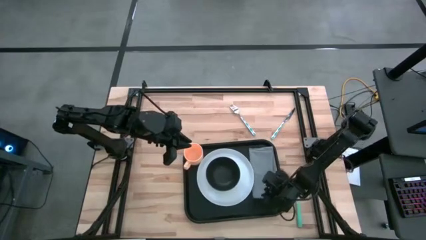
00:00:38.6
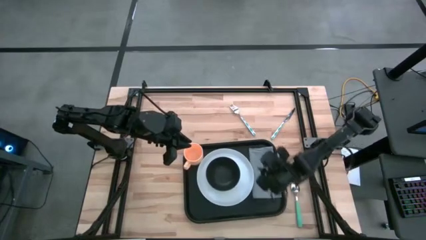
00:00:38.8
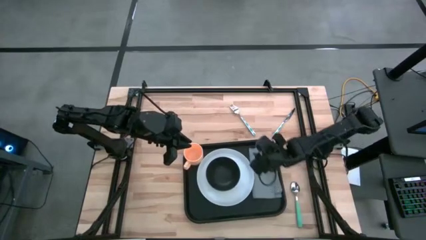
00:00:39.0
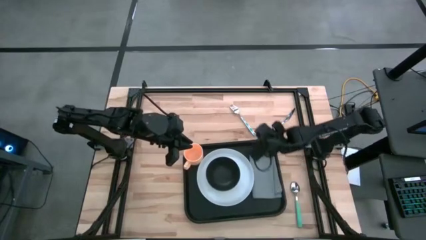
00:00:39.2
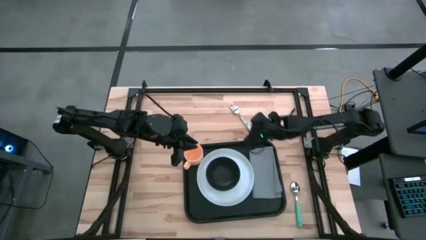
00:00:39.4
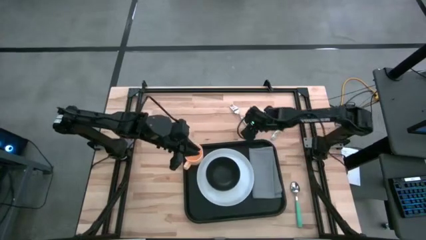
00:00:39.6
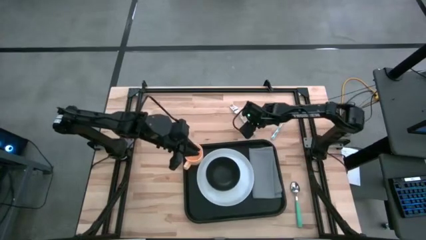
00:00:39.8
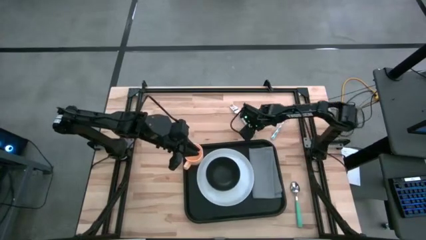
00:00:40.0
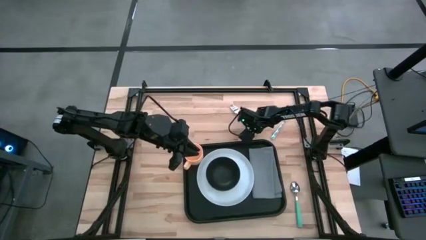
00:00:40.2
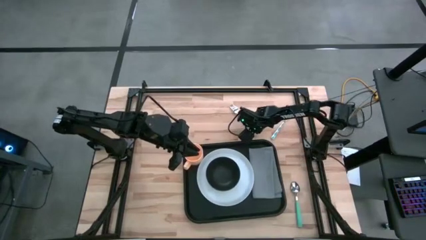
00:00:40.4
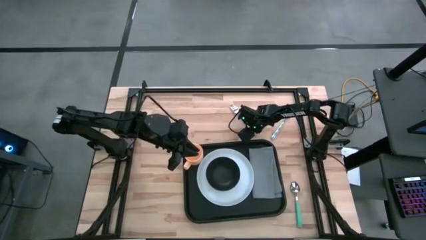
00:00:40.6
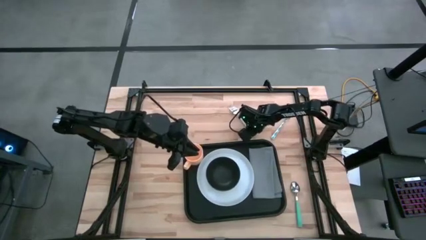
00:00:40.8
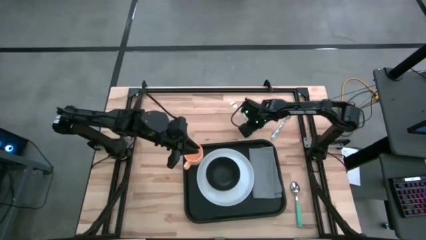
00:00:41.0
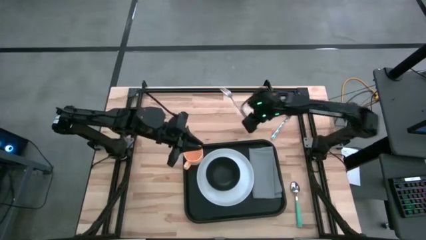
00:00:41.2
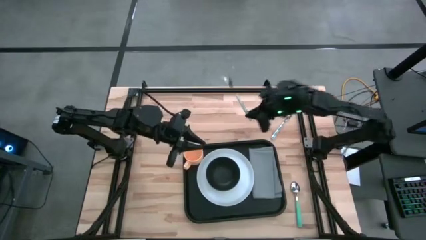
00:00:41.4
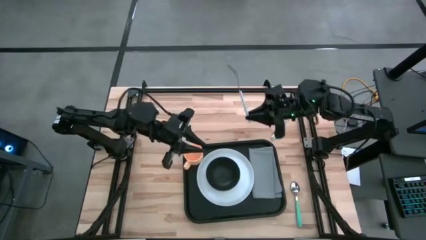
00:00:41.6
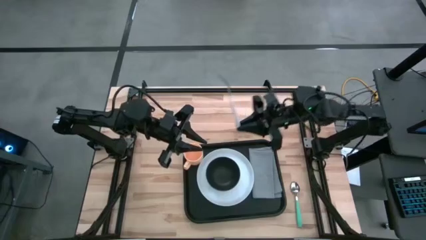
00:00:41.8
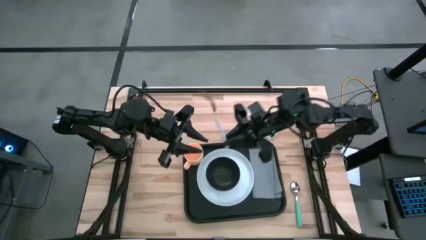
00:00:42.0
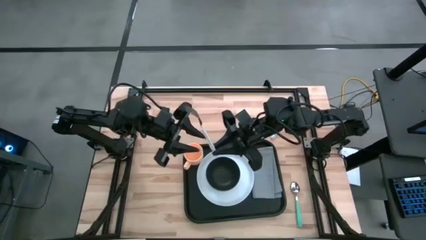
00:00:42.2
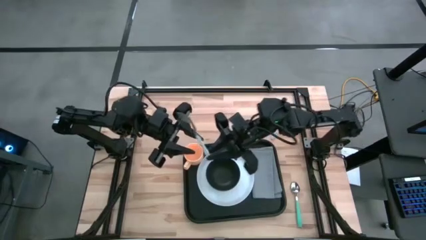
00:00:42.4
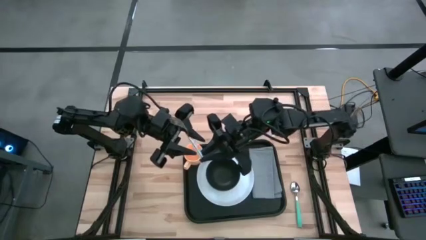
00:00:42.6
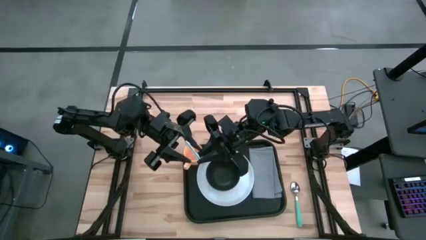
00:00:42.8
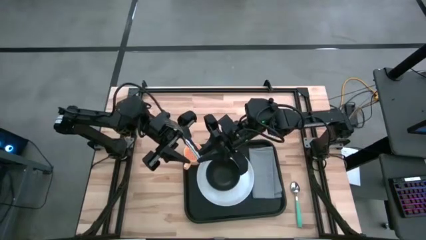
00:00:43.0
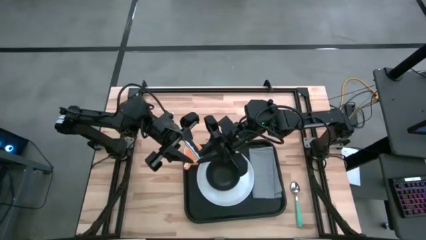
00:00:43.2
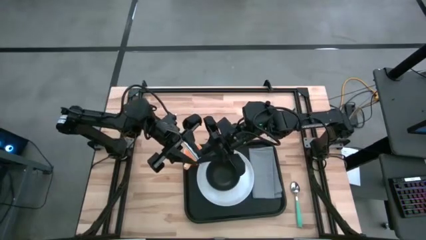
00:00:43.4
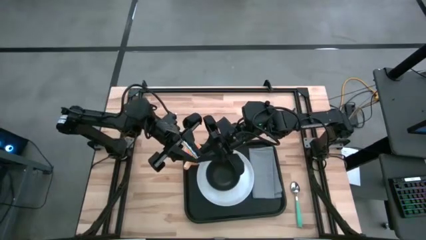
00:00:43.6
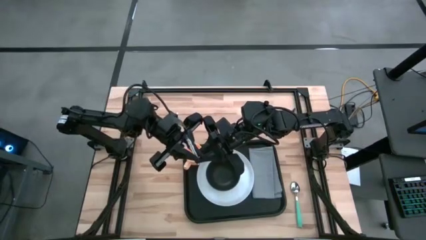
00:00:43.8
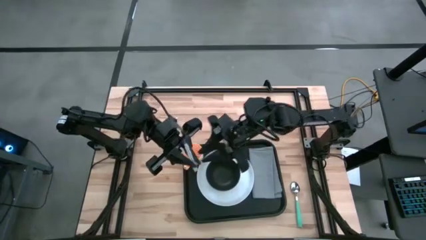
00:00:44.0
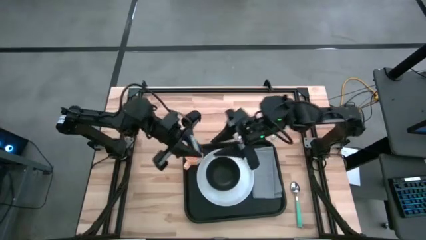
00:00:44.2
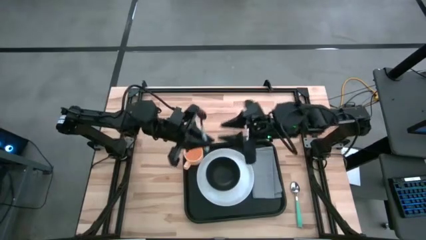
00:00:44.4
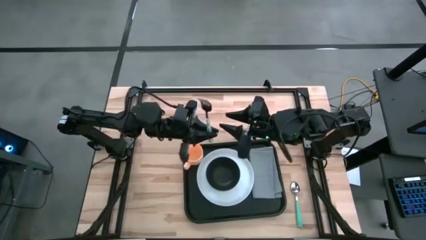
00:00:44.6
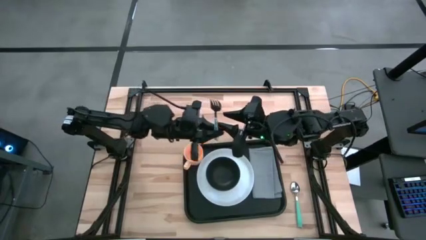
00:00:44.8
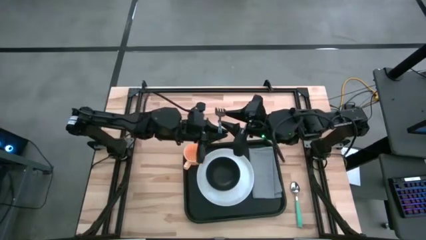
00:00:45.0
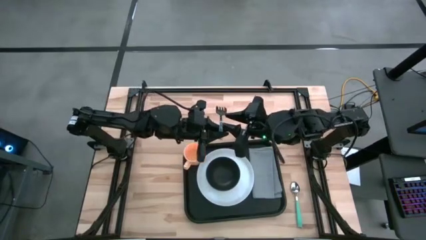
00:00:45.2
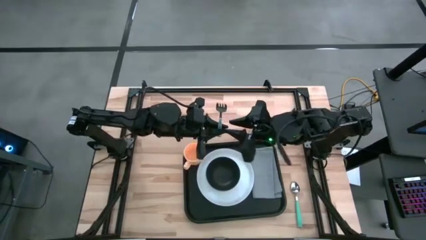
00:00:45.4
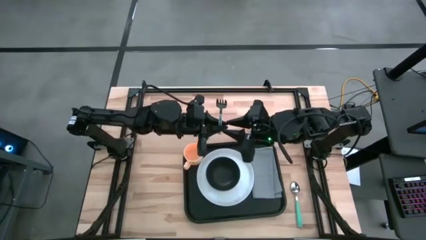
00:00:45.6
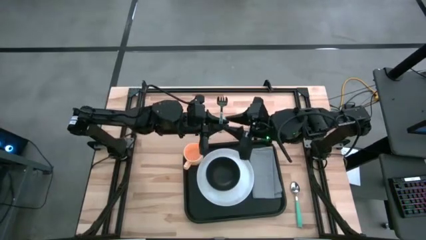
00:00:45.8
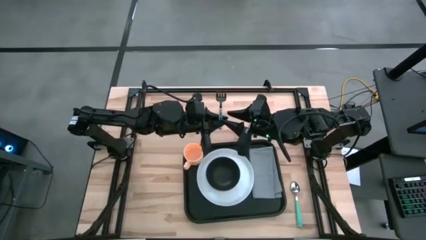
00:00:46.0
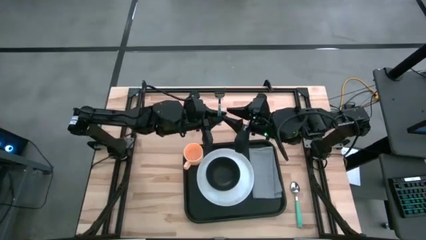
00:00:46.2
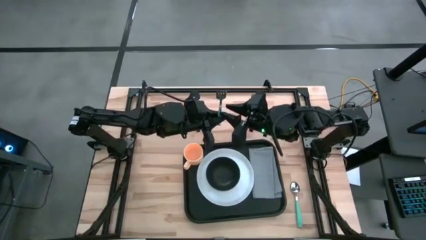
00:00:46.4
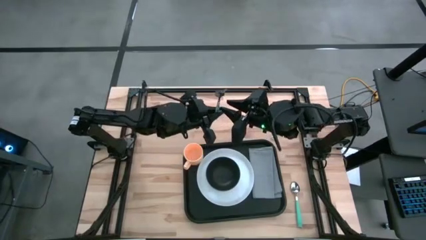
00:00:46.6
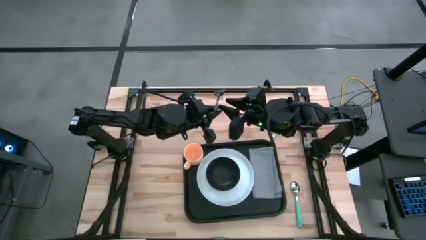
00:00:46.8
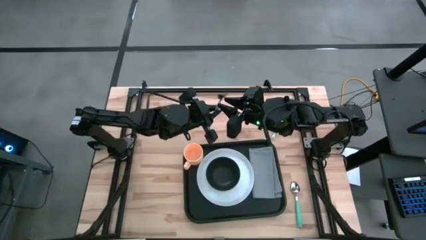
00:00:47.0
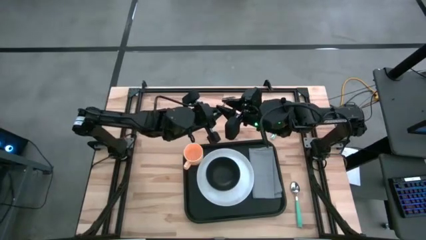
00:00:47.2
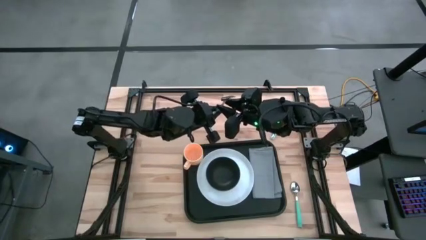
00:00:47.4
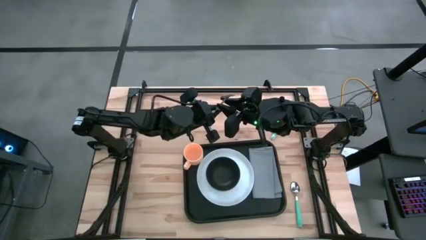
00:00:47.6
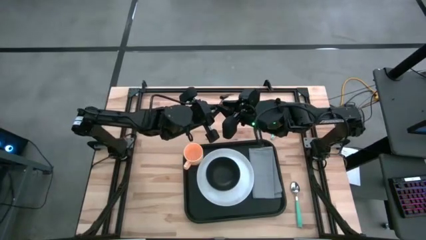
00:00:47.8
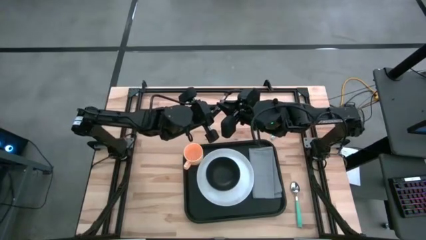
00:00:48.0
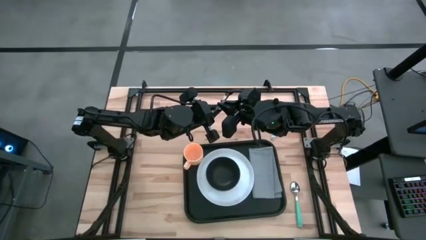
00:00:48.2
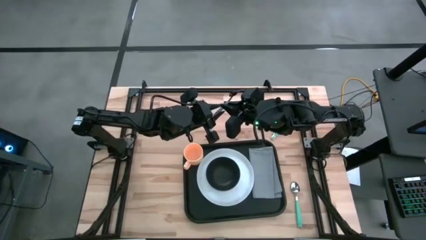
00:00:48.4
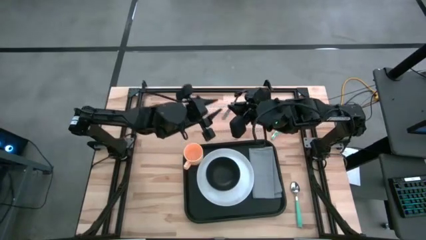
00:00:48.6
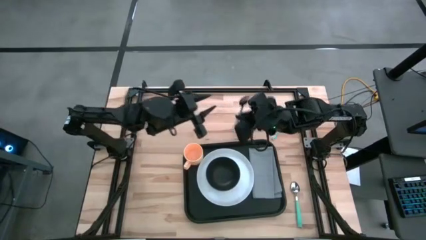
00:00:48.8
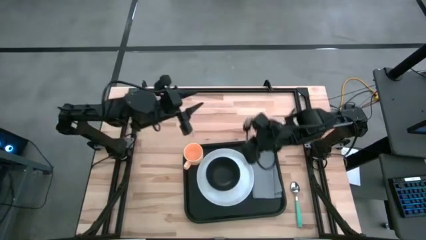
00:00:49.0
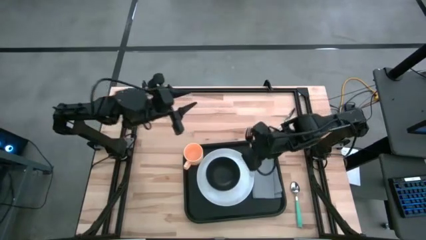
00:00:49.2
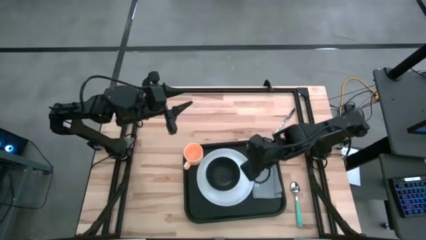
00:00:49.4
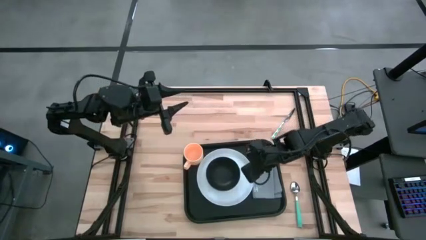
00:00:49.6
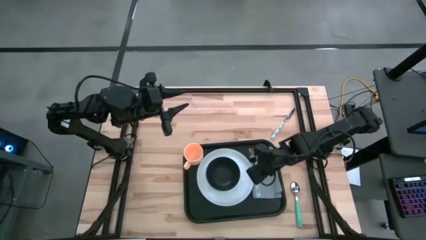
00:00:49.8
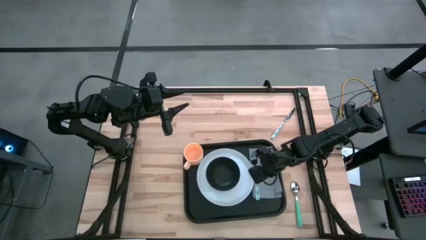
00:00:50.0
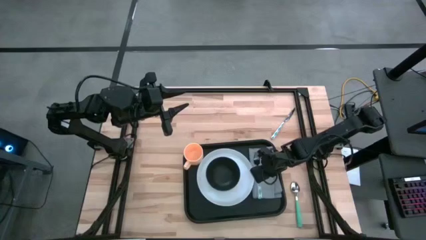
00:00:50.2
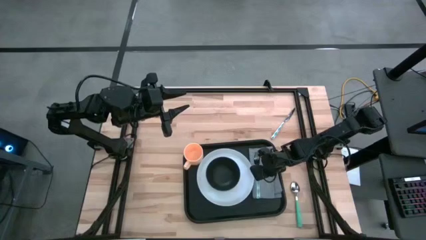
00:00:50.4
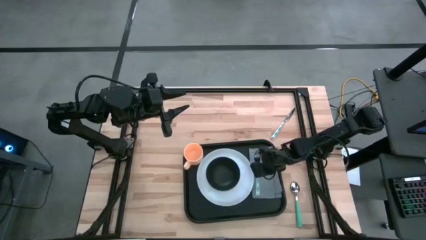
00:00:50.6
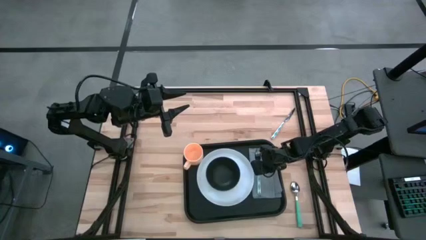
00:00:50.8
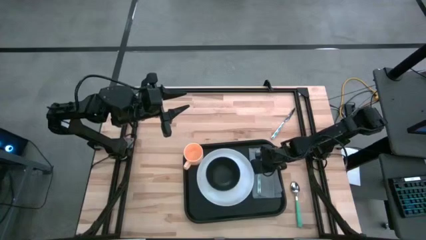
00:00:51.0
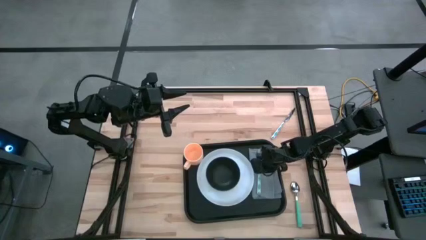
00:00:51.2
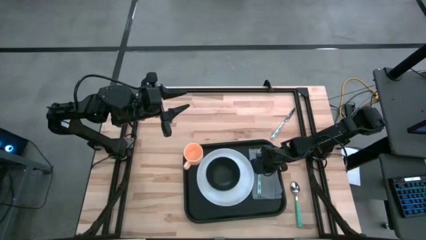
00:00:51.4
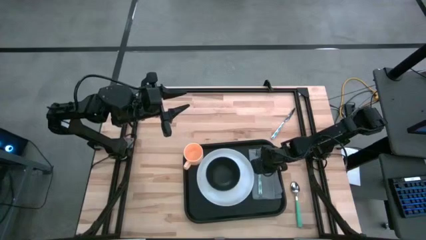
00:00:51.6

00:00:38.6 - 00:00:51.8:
Task: Set up tray
Put the white fork to the right of the white plate on the gray napkin

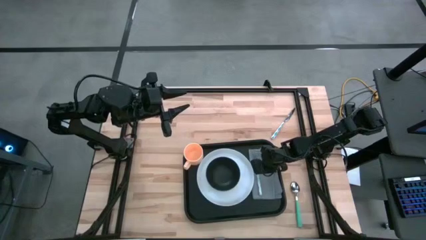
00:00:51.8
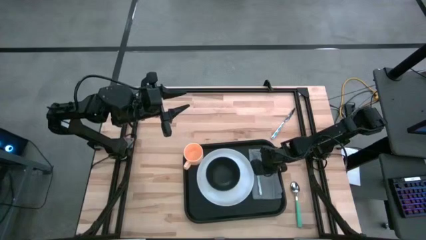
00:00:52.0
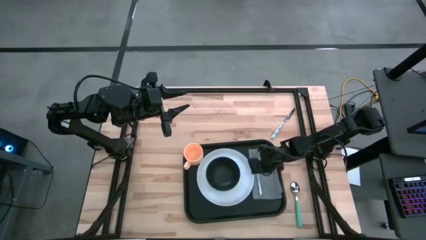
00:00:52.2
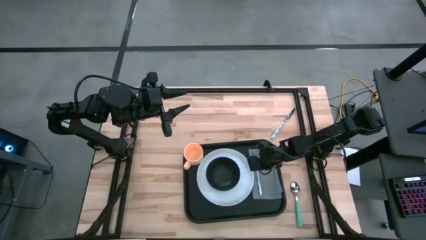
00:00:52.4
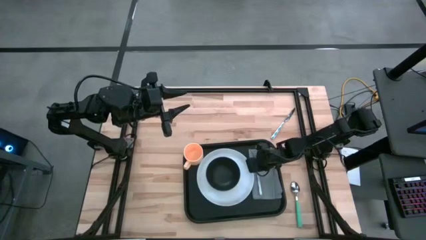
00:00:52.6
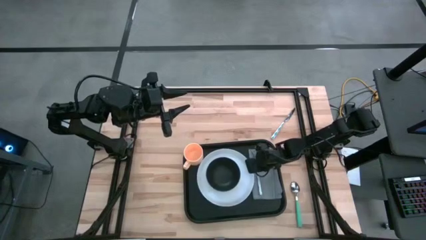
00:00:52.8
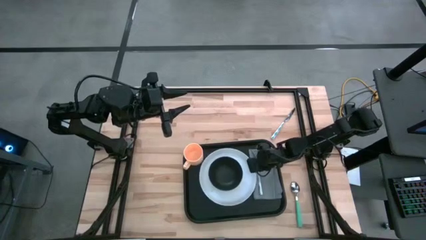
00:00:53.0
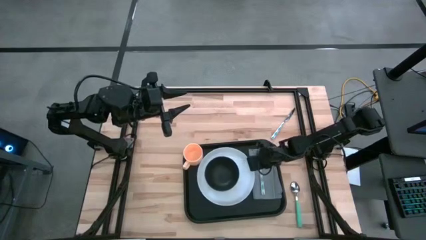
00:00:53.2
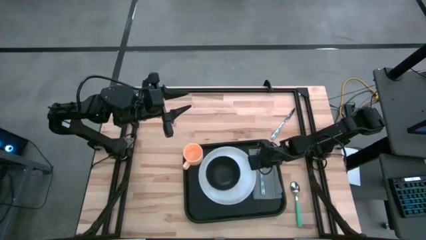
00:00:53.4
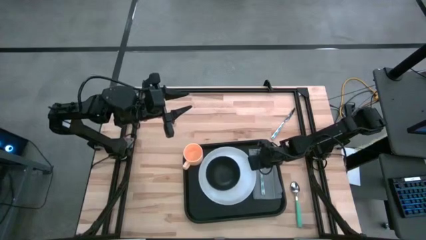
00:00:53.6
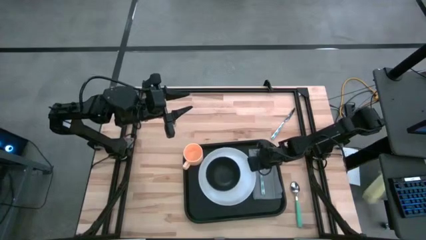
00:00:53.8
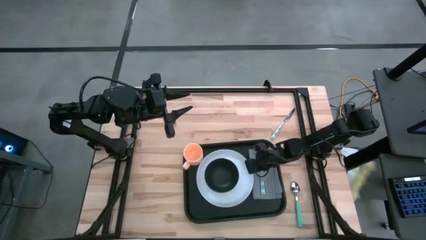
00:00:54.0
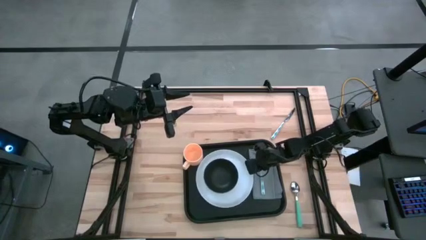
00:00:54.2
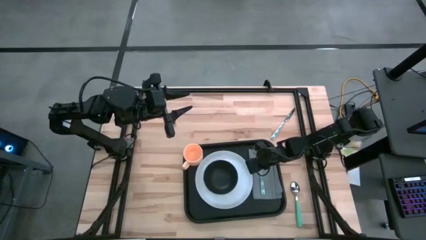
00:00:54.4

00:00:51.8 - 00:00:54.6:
Adjust the white plate on the black tray

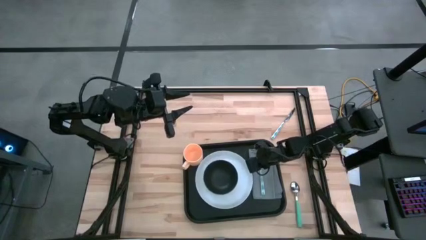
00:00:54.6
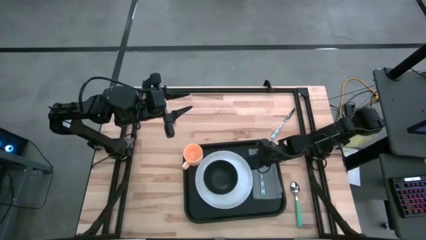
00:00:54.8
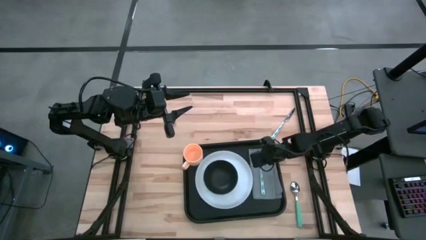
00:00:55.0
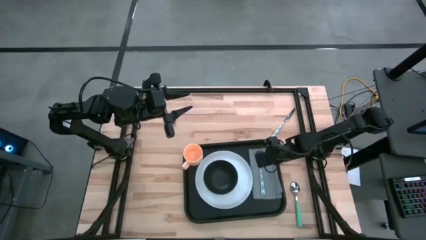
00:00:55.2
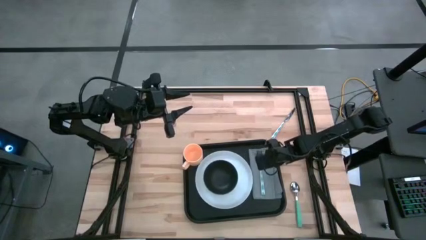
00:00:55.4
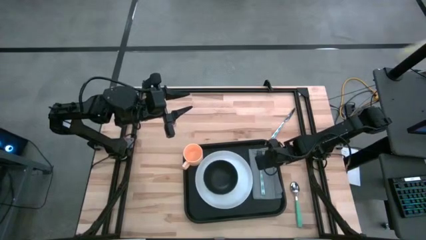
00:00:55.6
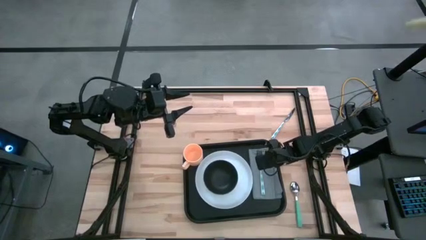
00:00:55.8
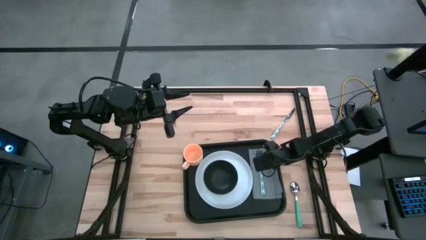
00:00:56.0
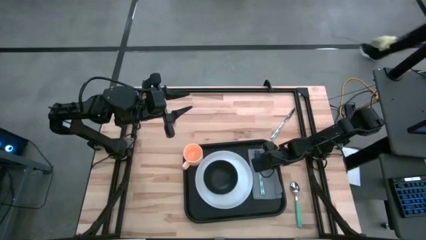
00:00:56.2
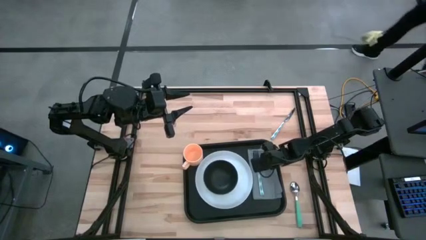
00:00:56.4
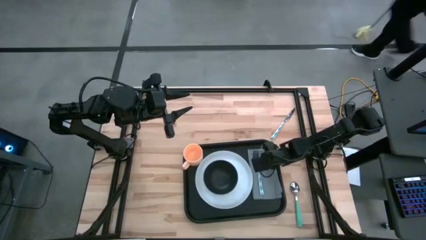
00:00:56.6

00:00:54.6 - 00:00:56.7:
Adjust the white fork on the gray napkin
